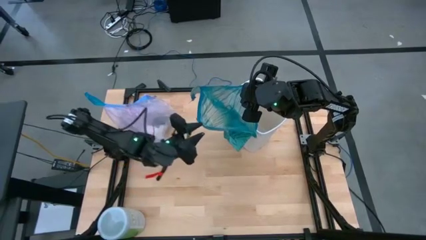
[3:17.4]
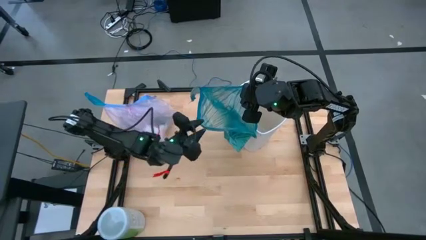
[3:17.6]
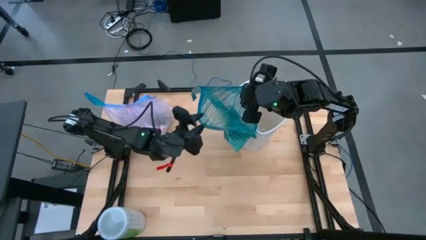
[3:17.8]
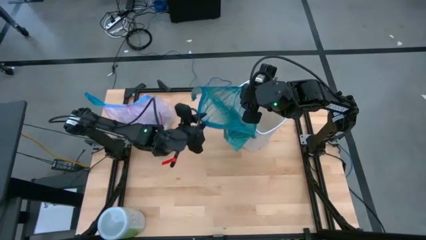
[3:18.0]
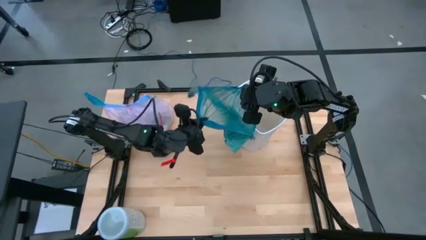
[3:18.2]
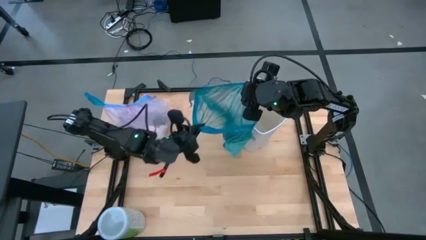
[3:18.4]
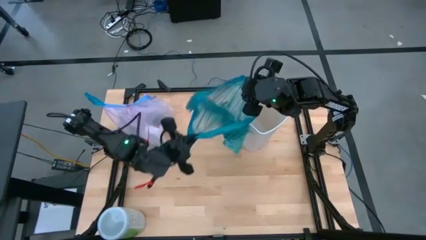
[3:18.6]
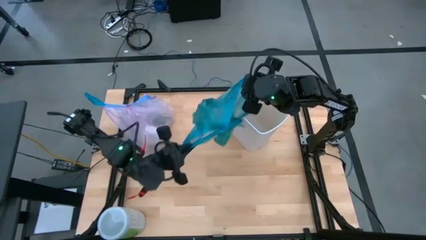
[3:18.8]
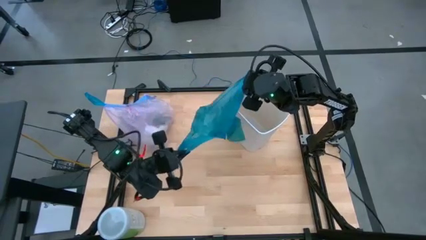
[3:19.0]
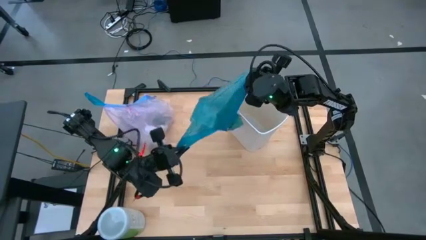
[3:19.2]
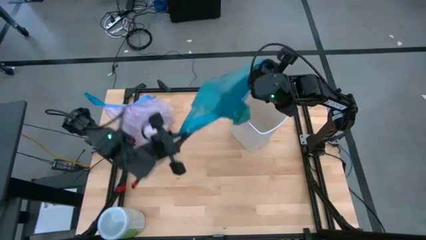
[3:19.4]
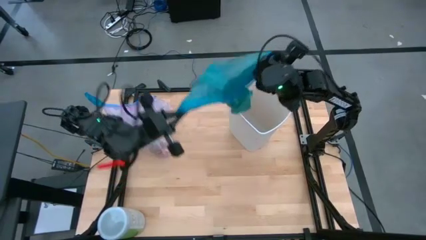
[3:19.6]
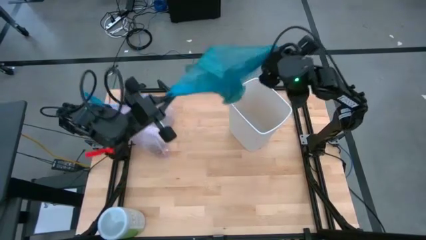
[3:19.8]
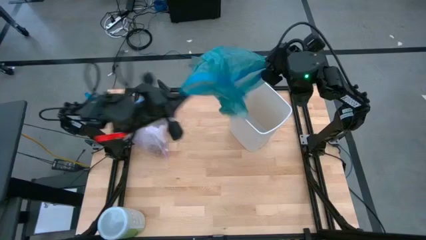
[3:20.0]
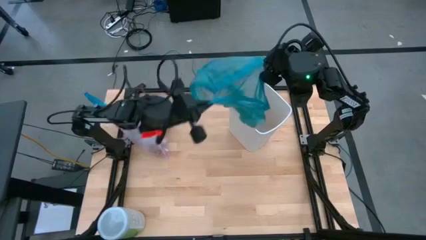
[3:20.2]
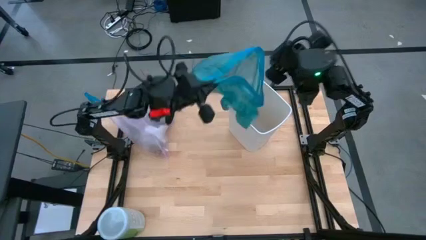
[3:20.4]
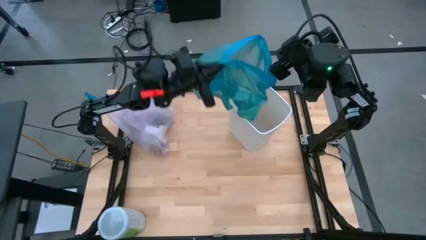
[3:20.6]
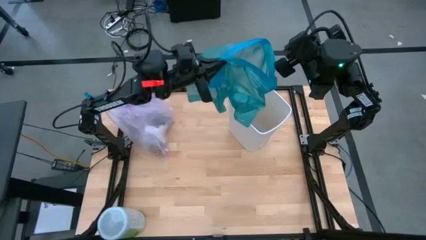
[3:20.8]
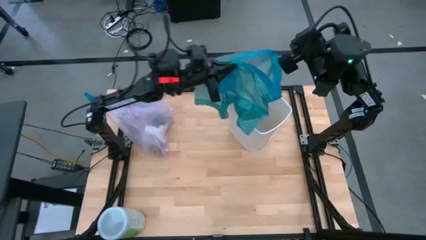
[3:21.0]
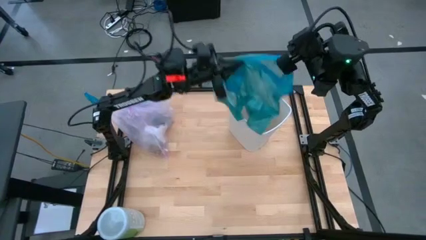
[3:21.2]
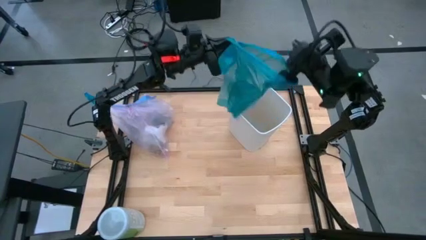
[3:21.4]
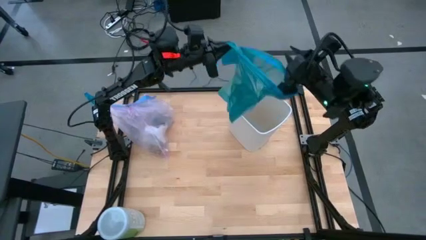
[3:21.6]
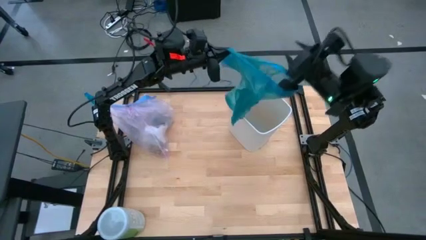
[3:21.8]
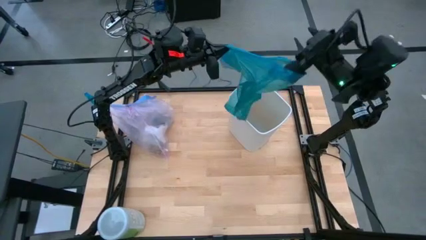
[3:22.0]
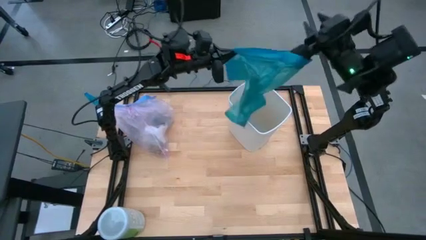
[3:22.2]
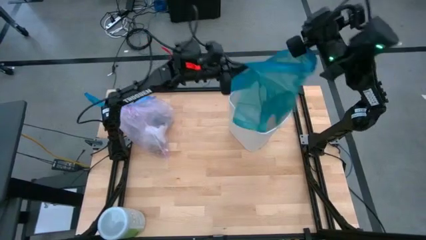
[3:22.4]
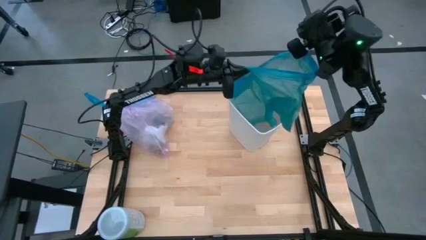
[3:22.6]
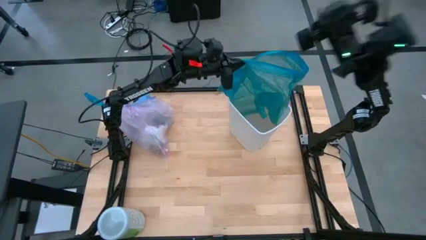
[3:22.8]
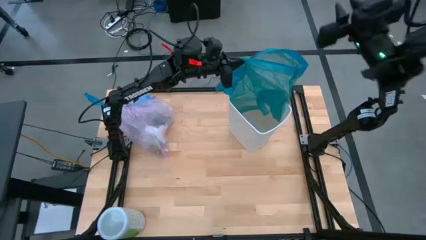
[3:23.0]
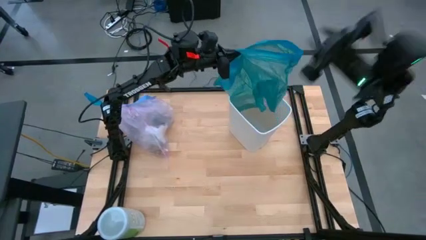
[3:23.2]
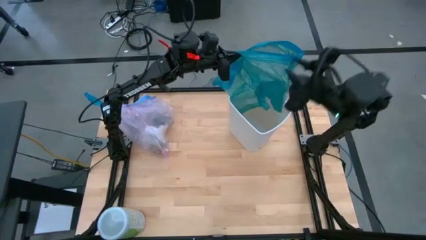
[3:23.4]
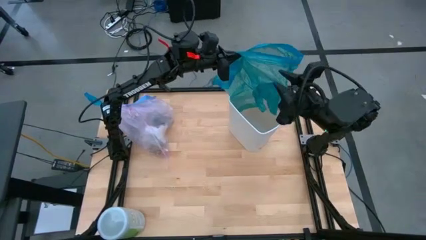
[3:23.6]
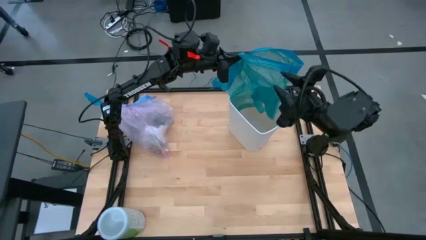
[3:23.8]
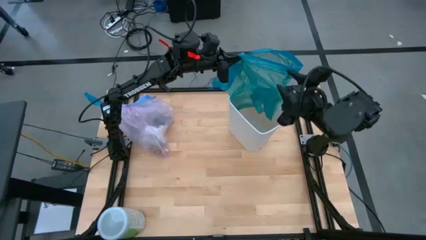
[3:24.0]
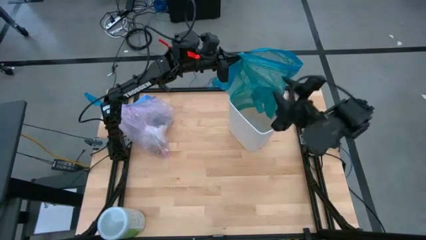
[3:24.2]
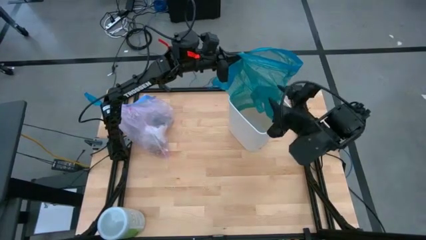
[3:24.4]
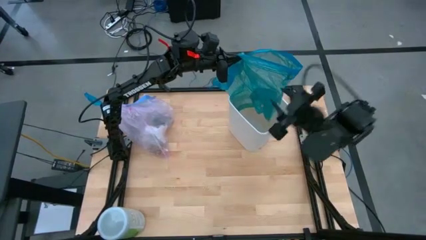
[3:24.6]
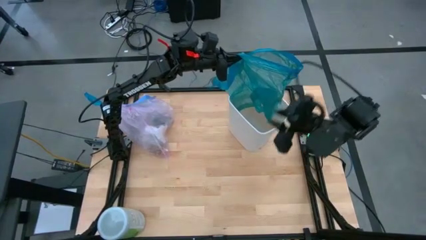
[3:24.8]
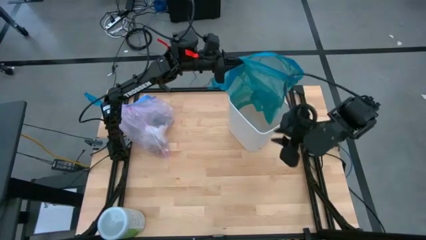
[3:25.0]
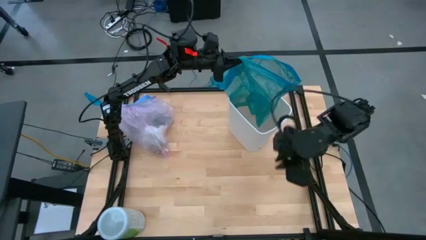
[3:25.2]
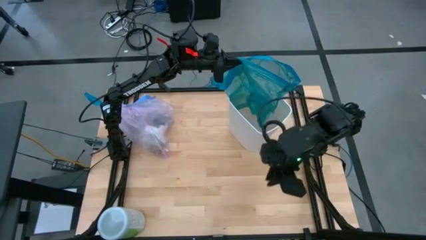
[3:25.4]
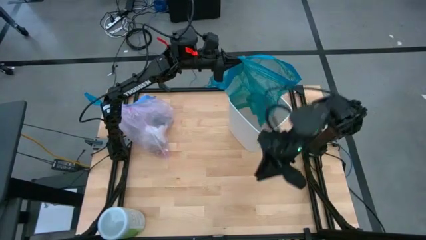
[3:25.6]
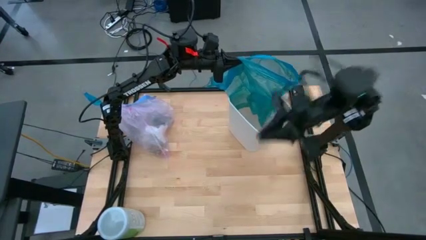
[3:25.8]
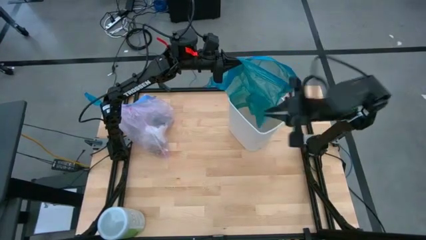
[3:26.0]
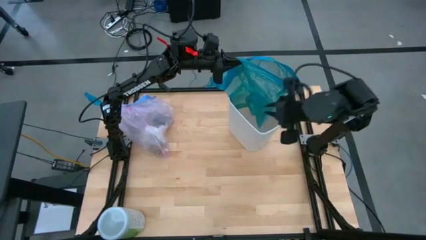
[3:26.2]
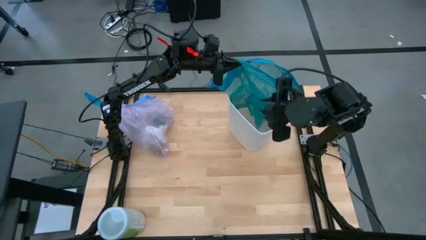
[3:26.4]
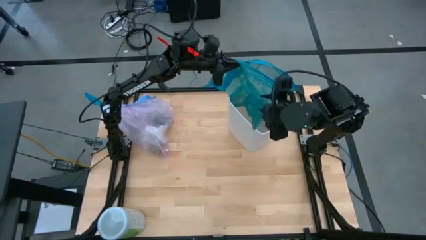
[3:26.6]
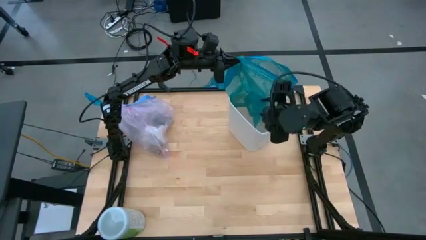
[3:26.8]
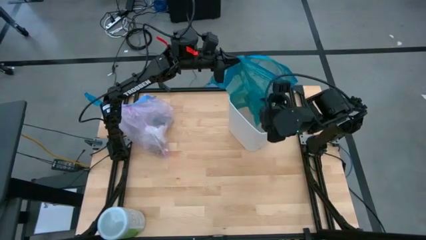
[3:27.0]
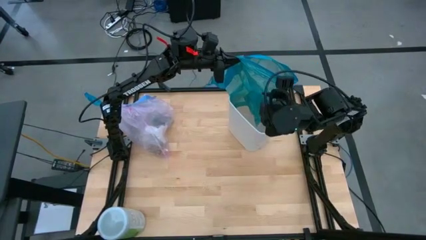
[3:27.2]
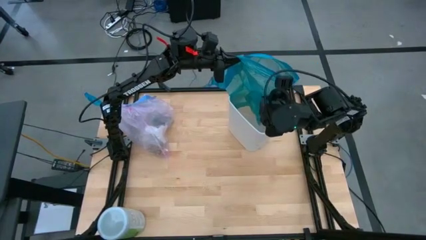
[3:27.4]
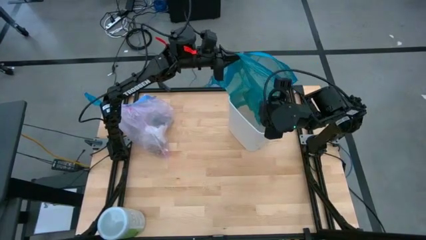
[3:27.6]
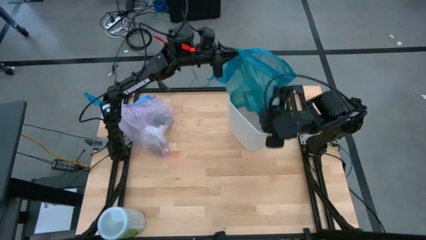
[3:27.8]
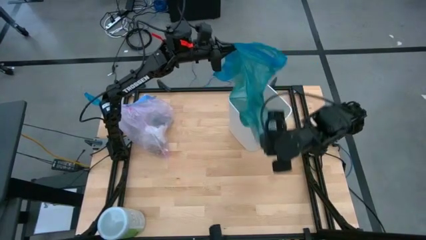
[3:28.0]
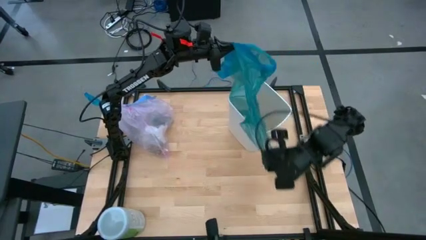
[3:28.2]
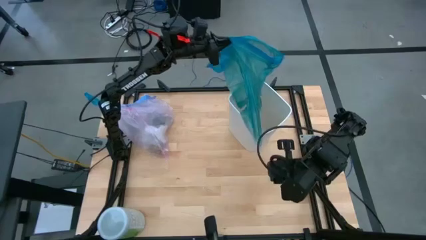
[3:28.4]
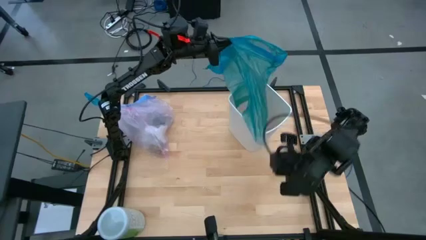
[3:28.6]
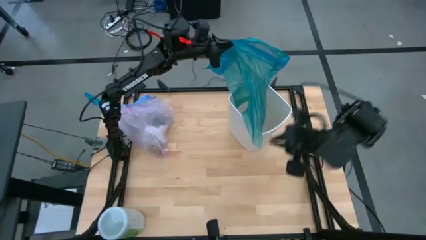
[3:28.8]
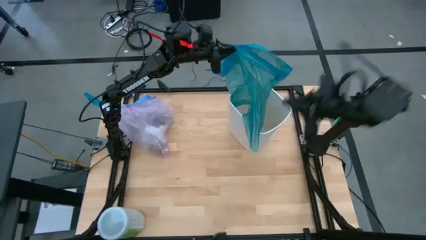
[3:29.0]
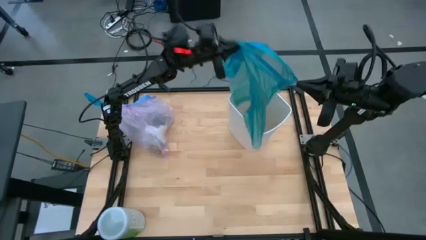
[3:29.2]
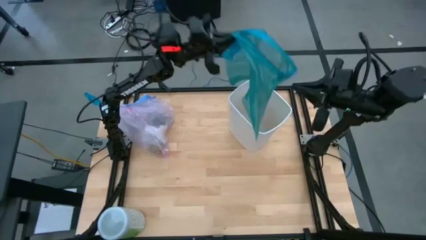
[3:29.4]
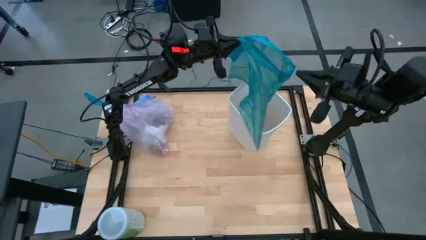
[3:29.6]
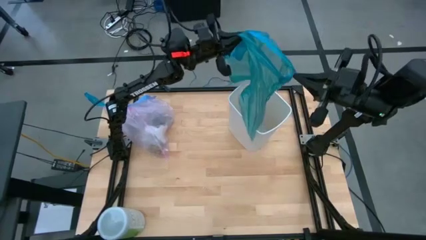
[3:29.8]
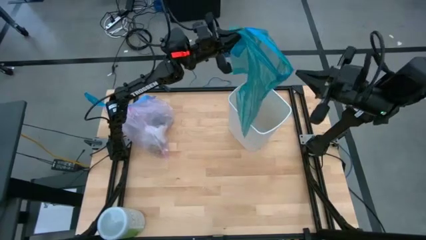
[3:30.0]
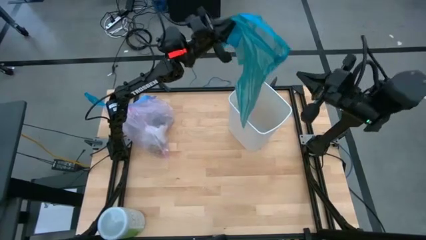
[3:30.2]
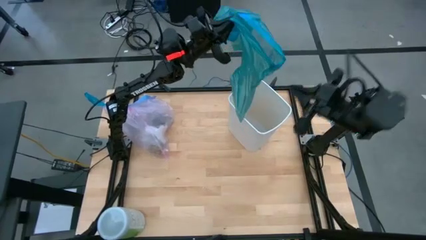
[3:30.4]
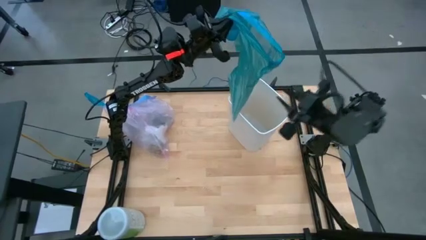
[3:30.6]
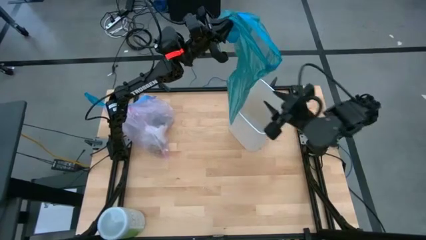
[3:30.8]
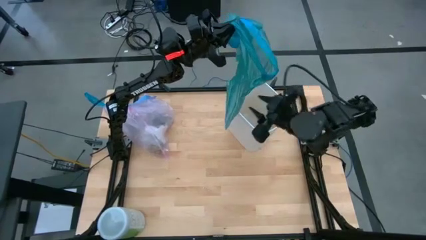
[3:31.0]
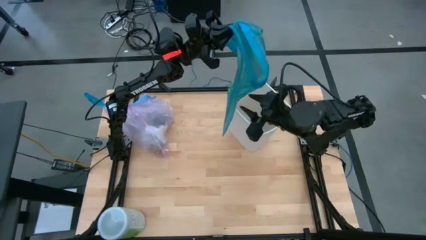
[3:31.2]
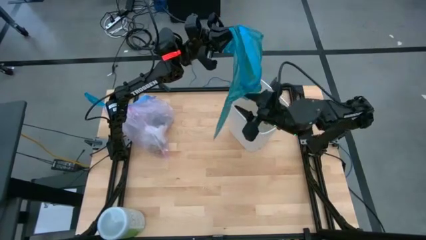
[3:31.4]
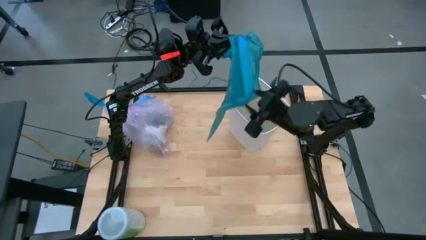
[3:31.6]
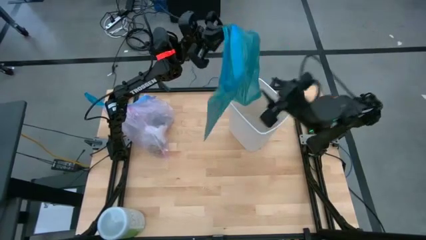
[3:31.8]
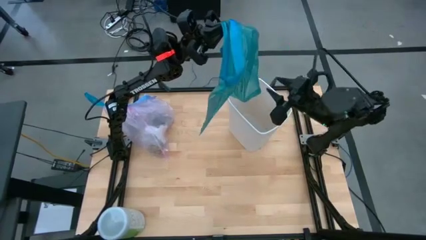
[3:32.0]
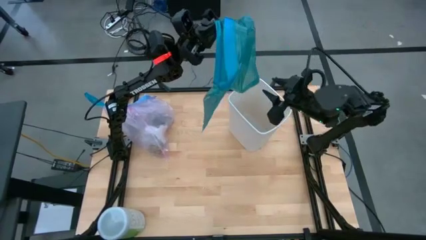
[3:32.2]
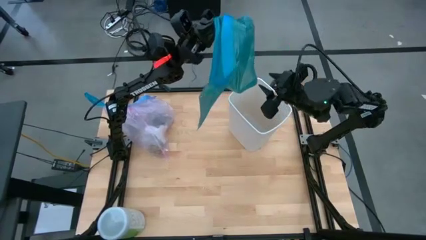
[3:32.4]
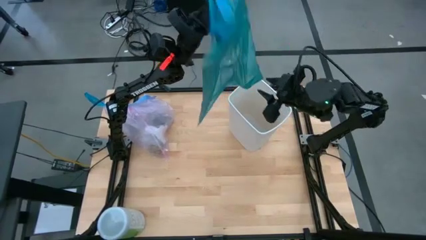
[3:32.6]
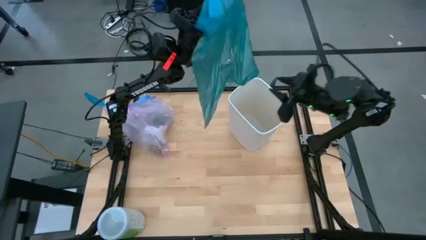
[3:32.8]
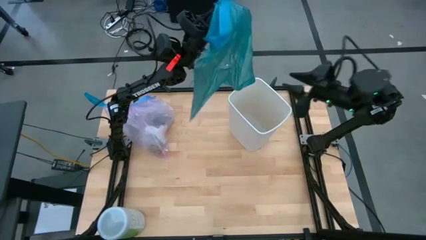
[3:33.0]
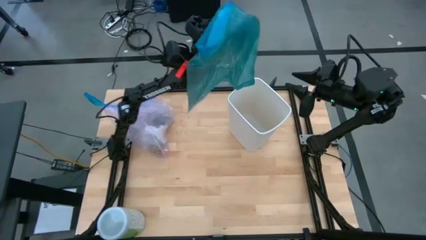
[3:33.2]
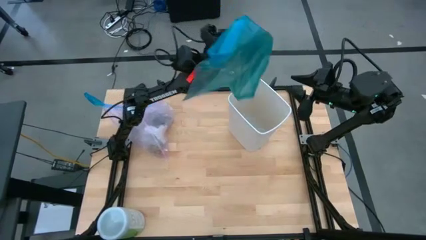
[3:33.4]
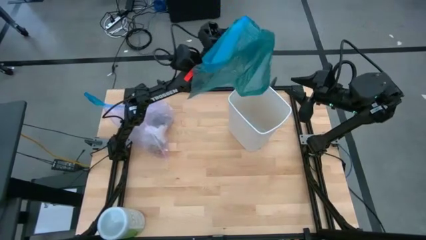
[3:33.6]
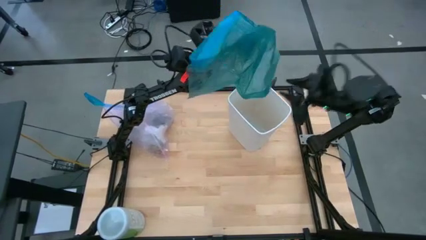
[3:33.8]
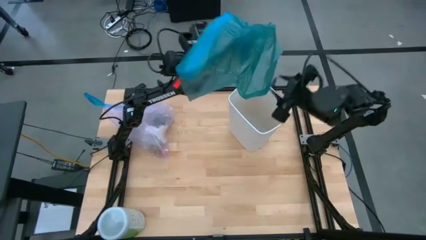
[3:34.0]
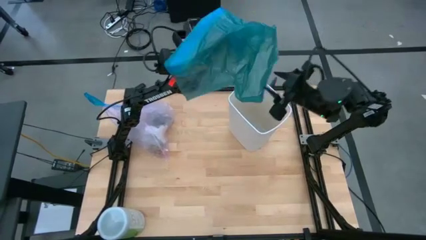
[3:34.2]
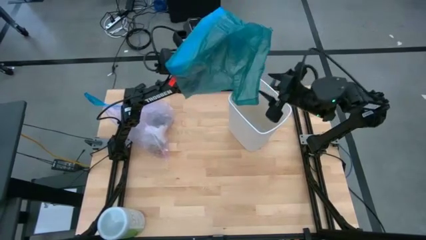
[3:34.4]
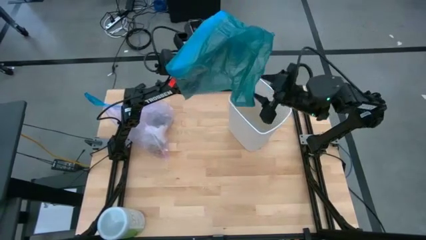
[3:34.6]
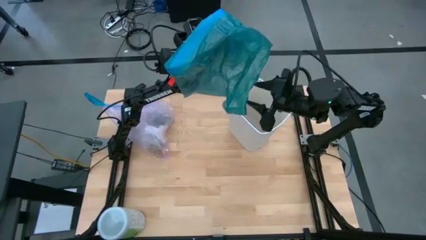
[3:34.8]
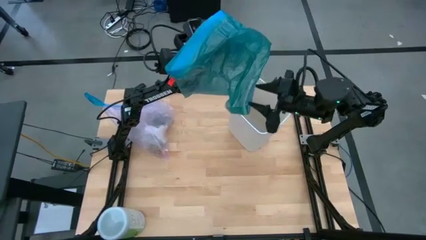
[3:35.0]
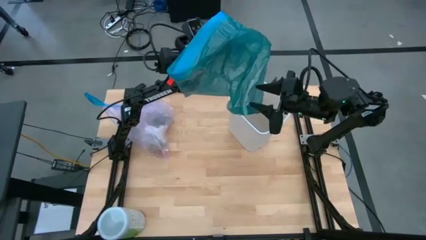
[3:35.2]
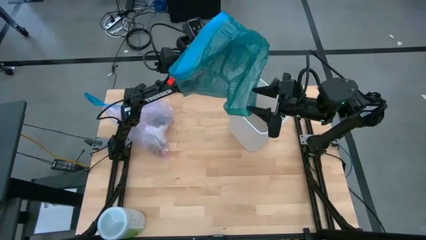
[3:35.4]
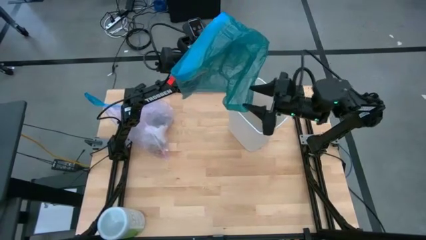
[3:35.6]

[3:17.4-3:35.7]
Task: place trash/remove bag and relplace
Put the blue trash bag into the white trash bin
